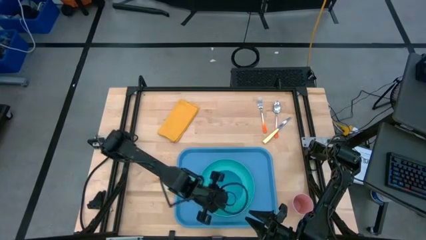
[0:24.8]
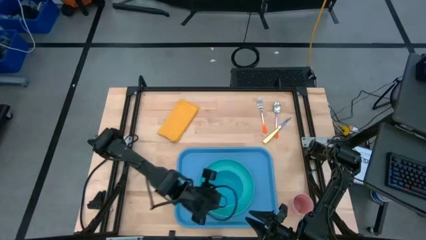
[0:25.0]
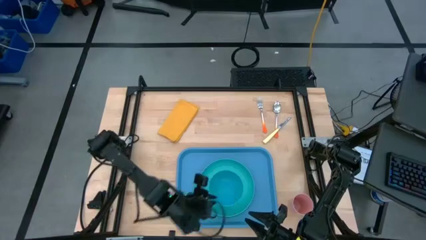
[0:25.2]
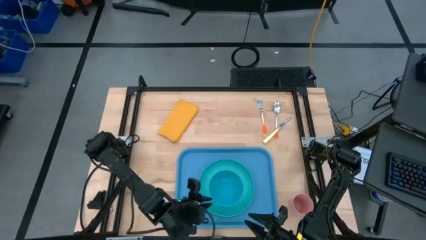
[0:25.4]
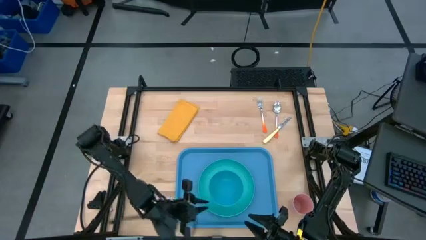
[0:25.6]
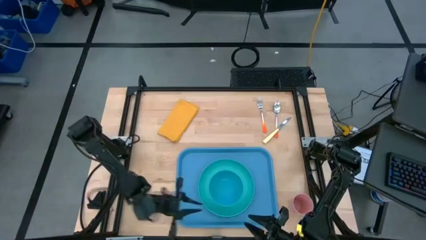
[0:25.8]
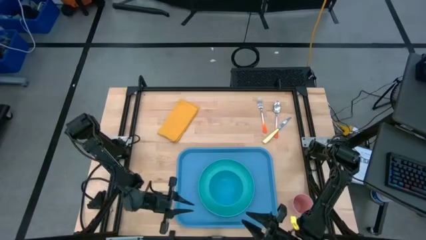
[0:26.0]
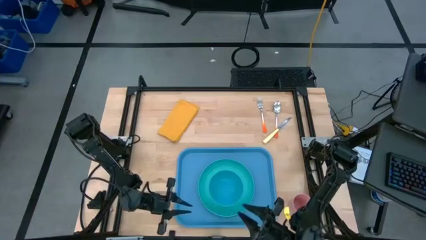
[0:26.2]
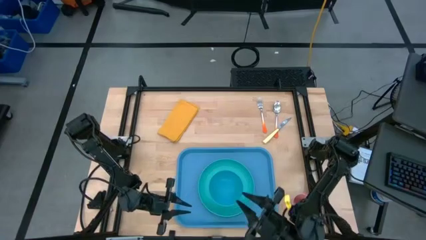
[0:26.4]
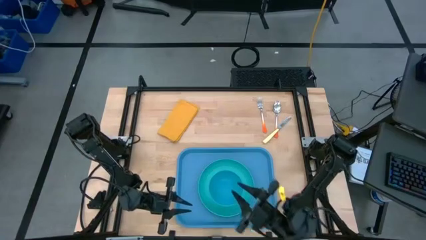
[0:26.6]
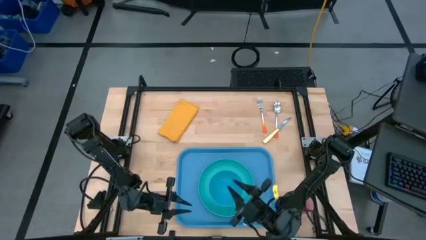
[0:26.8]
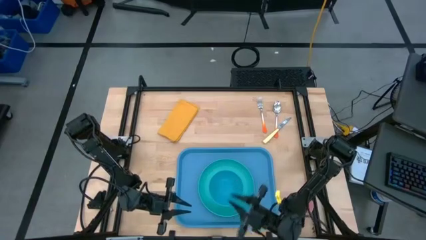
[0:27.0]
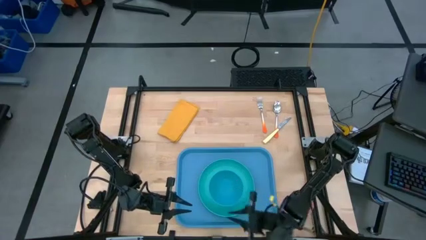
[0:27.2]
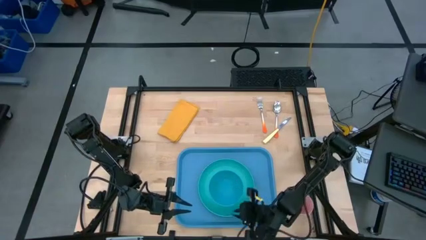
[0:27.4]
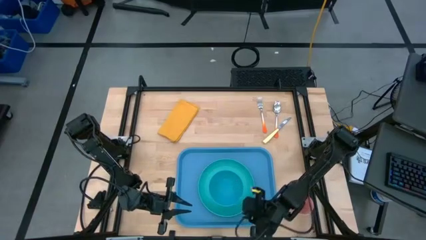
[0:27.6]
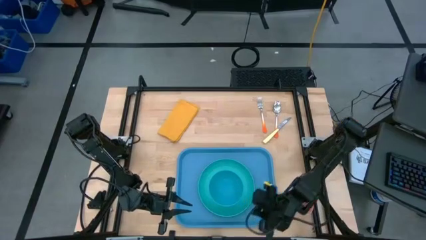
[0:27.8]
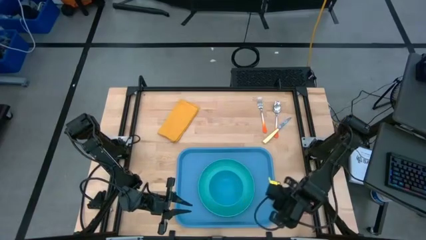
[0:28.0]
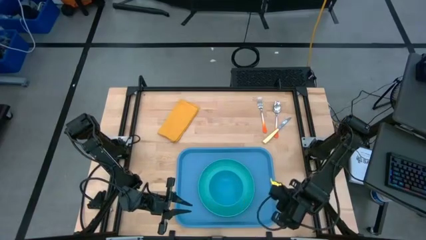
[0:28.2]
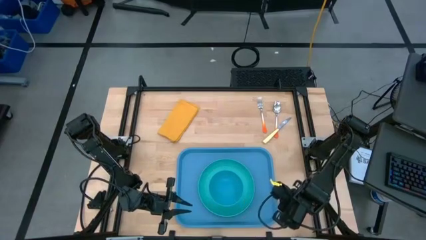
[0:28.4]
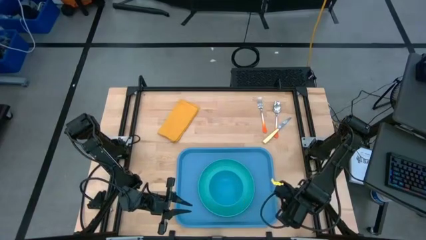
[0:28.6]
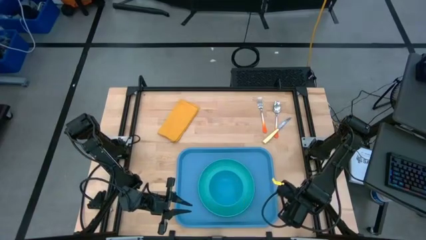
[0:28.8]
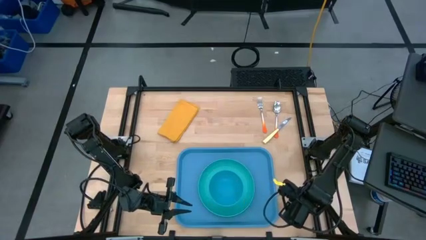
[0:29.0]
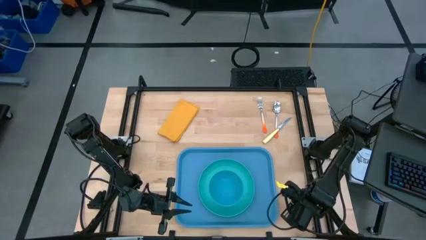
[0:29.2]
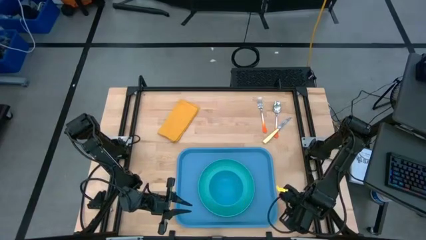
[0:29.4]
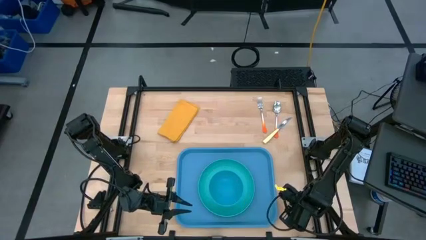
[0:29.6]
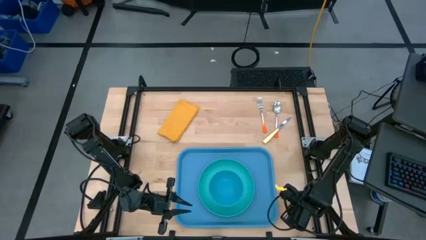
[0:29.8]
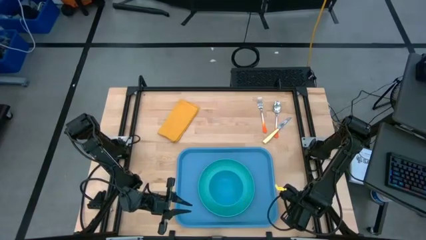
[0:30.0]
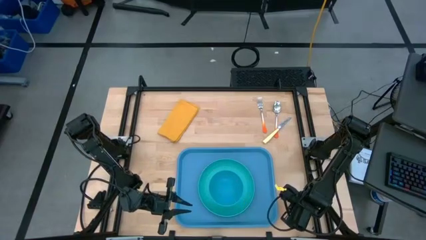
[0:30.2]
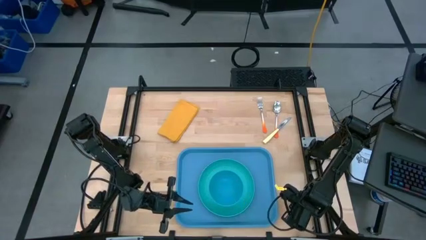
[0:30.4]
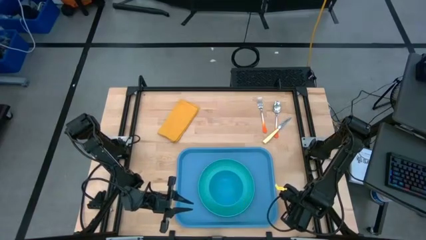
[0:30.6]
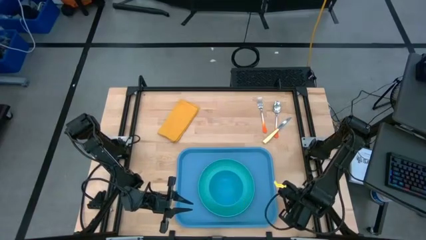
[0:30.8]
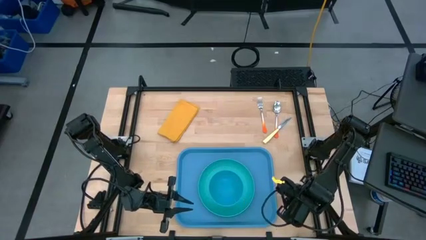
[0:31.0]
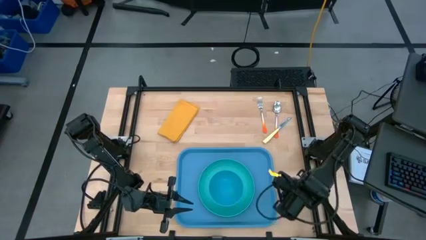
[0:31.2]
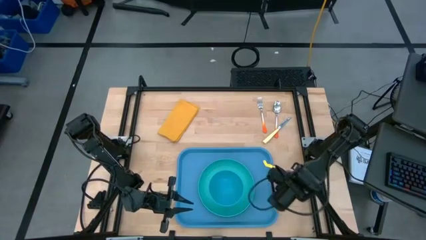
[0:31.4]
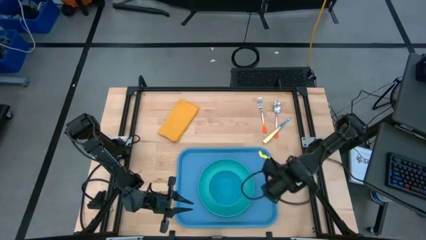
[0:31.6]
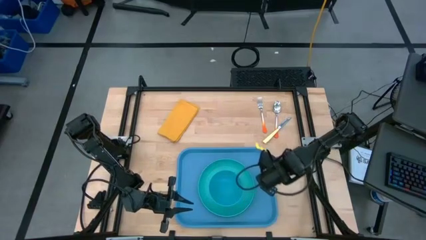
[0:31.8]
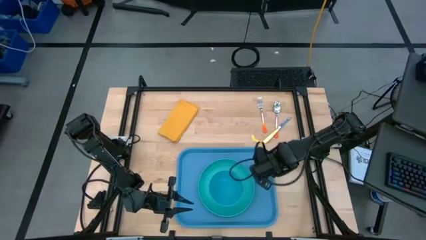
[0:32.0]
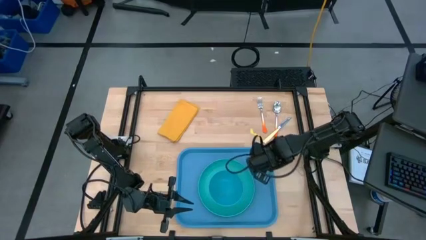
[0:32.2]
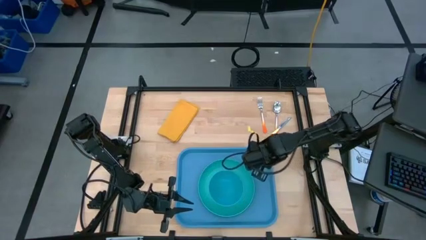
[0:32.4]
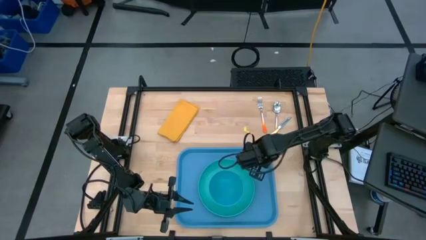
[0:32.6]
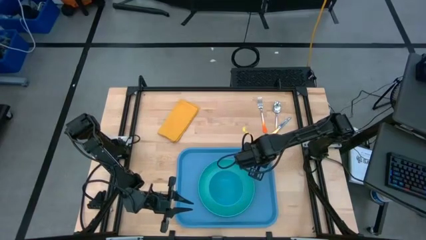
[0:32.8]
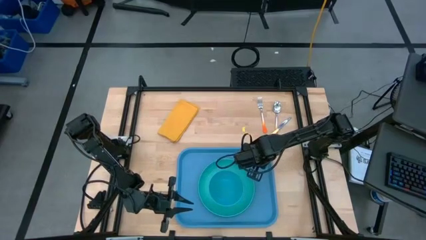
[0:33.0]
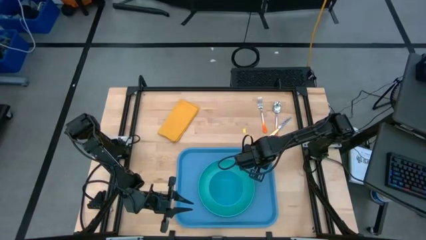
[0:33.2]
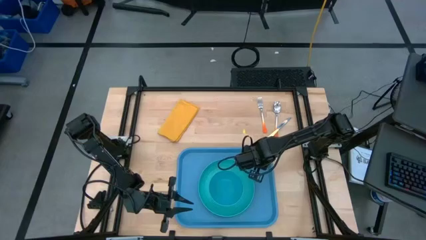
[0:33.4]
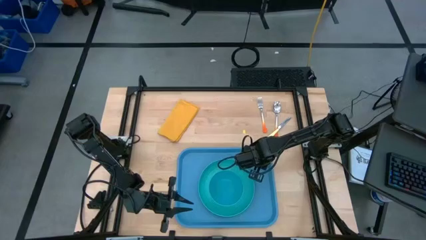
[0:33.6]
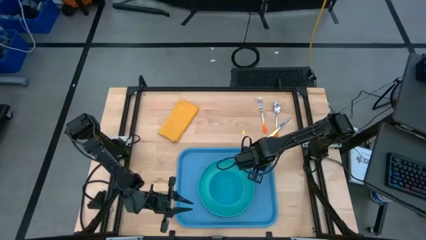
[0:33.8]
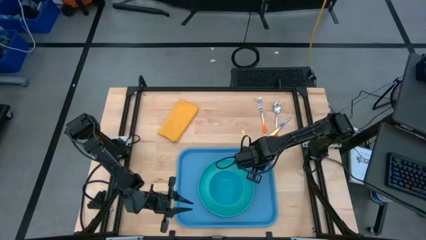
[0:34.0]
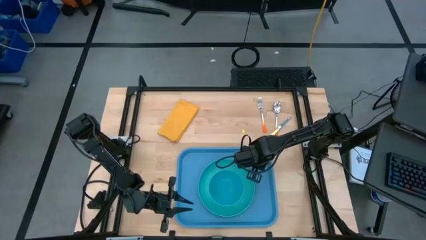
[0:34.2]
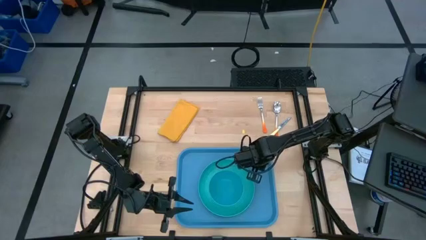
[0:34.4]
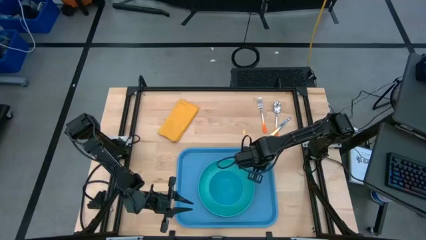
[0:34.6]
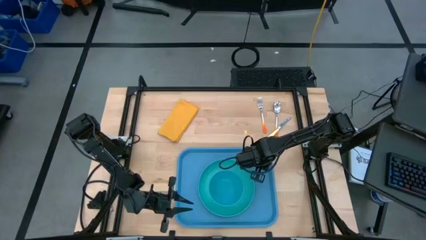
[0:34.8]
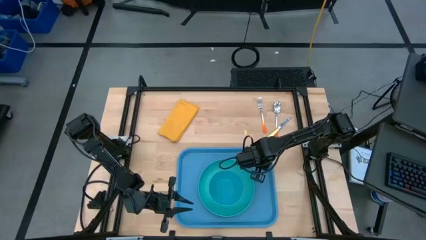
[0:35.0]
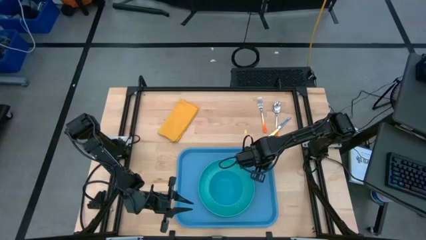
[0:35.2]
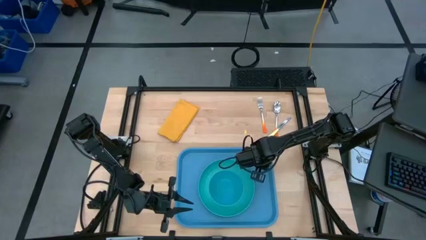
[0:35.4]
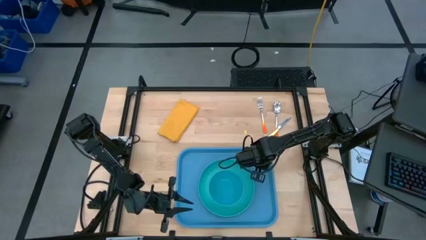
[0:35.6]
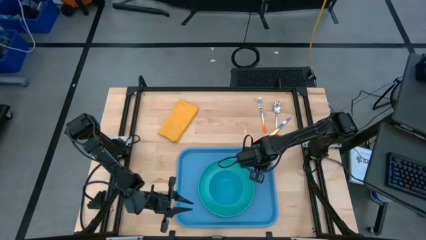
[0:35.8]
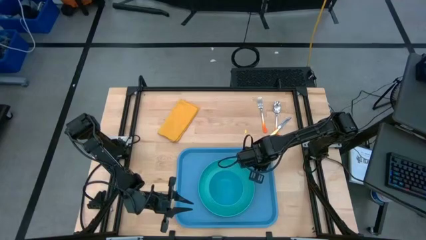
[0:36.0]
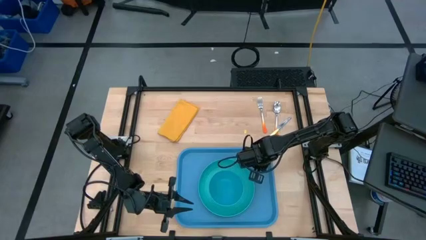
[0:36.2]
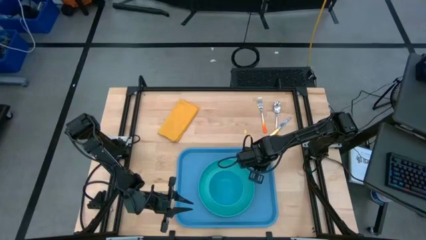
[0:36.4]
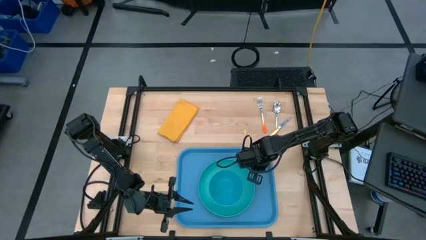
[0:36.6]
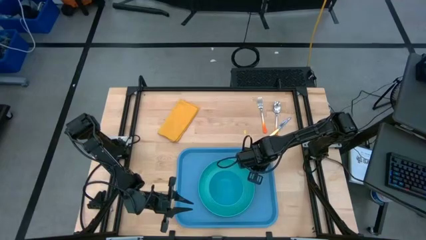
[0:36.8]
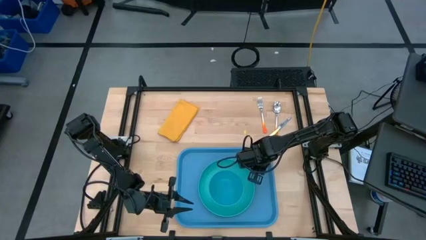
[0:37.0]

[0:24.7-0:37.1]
Task: Set up tray
Put the cup on top of the tray

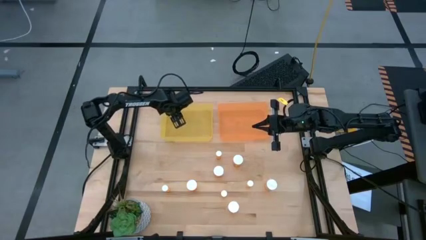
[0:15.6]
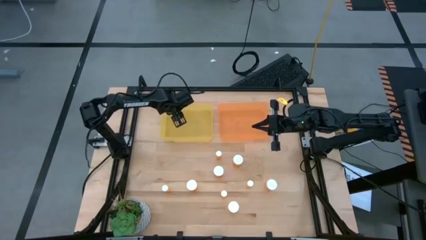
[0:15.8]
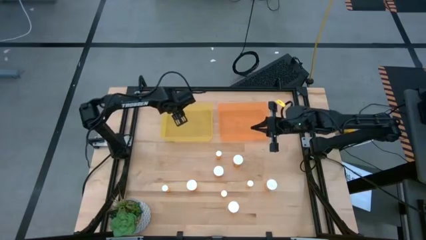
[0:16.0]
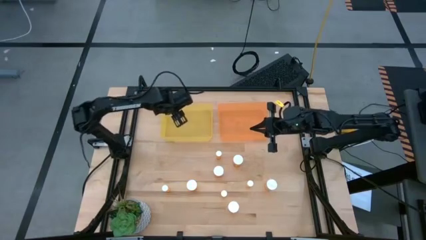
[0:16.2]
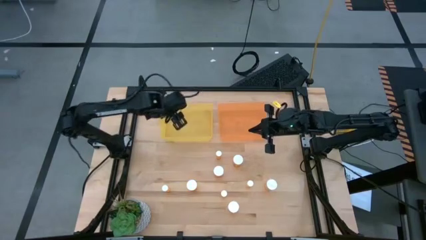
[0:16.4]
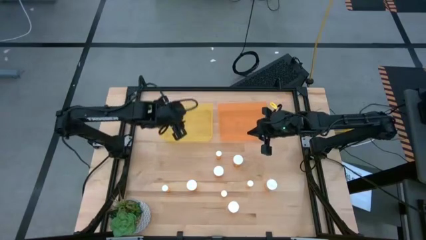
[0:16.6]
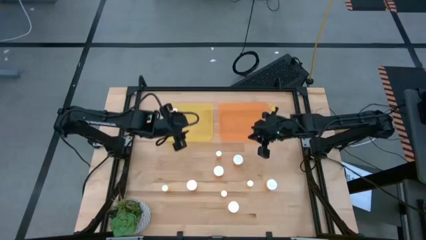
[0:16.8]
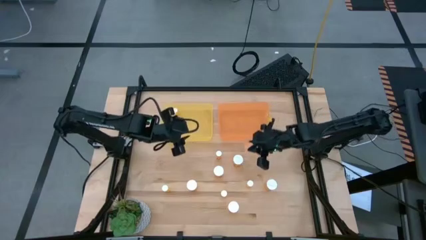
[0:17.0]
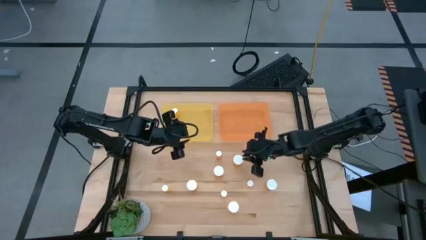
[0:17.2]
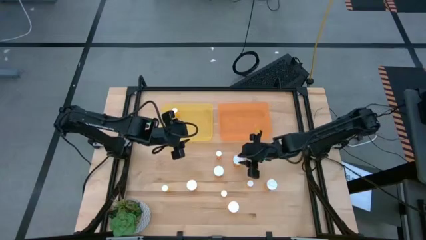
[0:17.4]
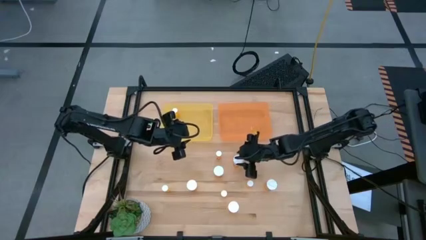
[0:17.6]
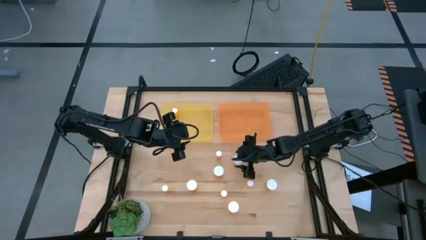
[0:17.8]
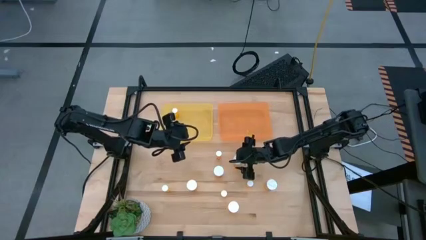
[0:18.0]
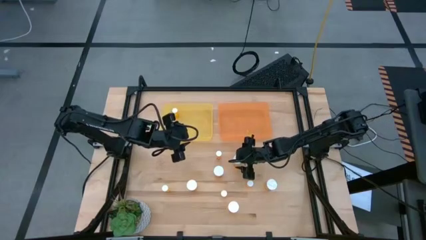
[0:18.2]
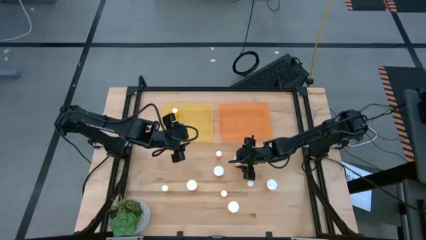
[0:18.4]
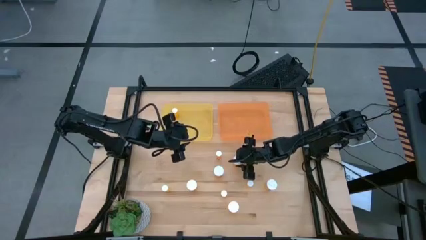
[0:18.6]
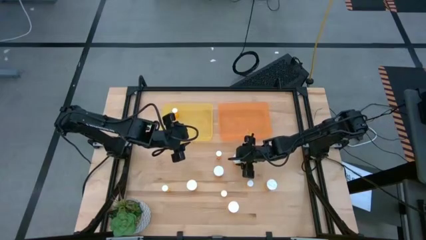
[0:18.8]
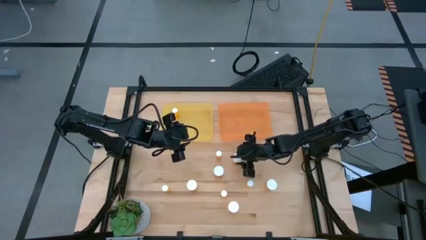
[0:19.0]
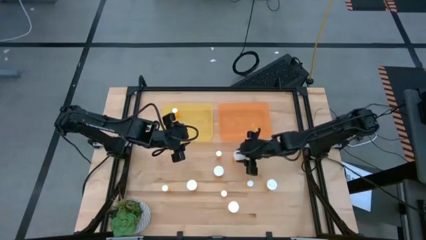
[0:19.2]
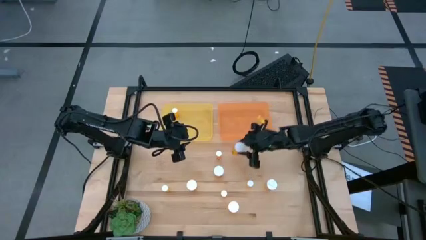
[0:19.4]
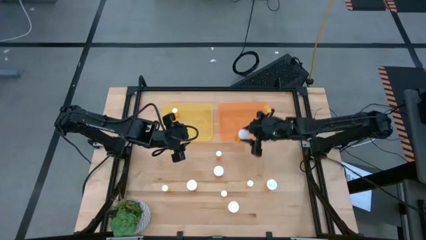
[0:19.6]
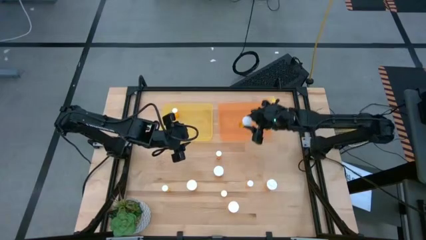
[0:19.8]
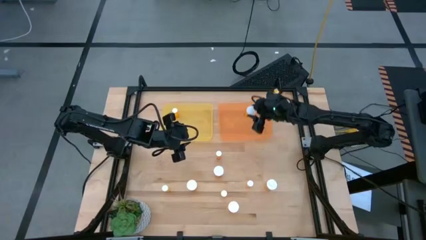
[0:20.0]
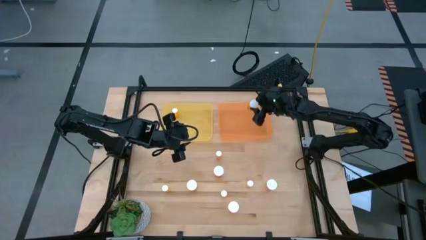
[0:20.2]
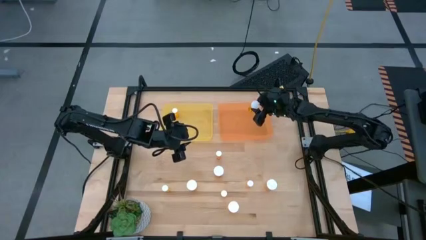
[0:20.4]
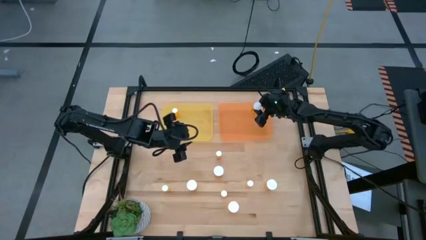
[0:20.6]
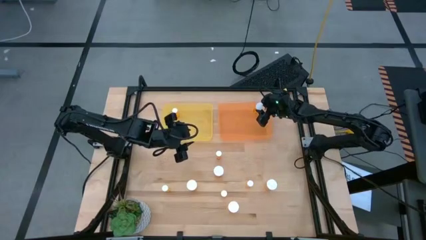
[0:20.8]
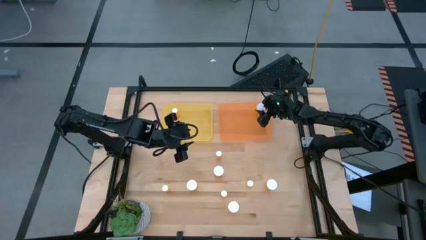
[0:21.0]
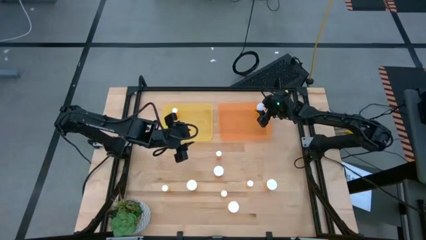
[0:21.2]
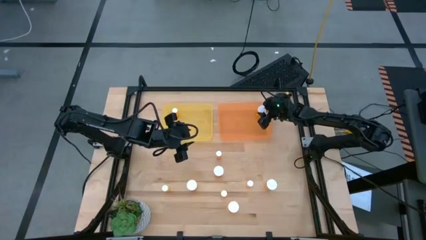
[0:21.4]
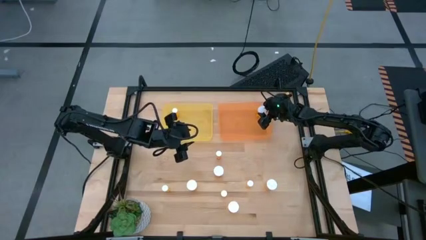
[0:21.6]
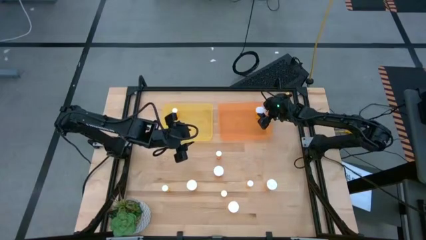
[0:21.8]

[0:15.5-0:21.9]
Task: Pick and place medicine bottles into bin by pill shape (circle, oval)
Put the big orange pill bottle into the orange bin
